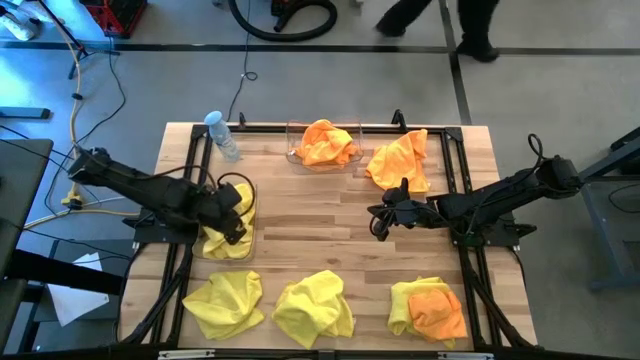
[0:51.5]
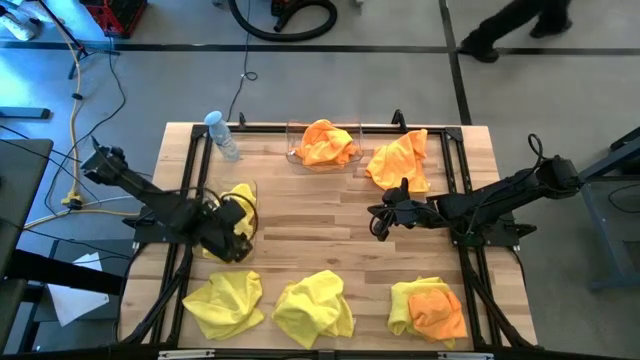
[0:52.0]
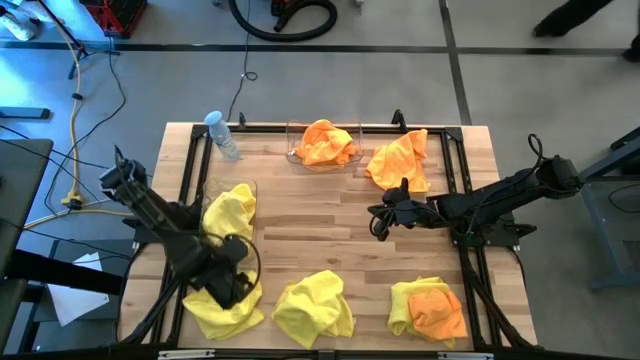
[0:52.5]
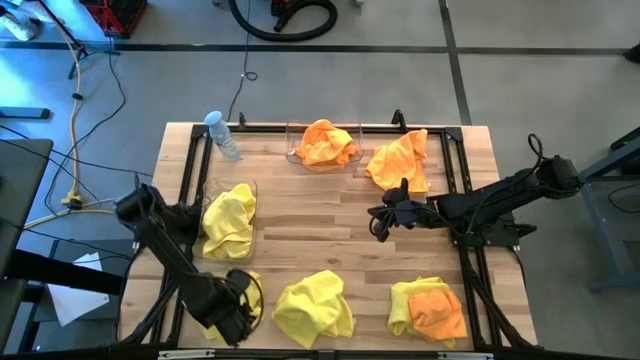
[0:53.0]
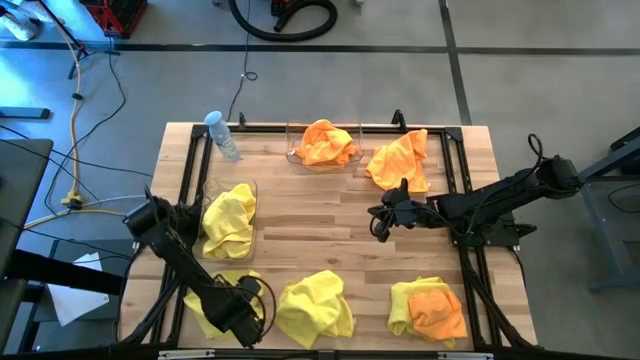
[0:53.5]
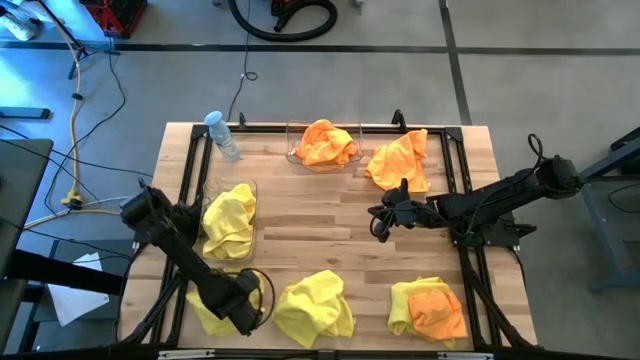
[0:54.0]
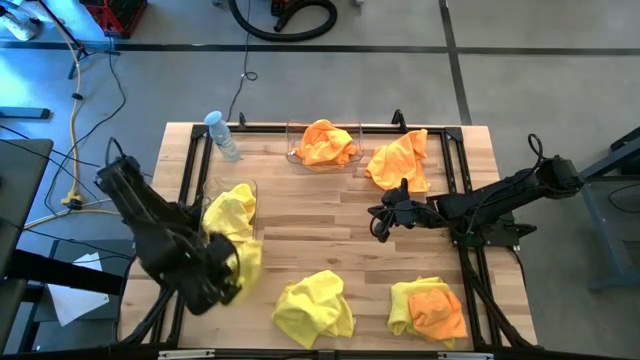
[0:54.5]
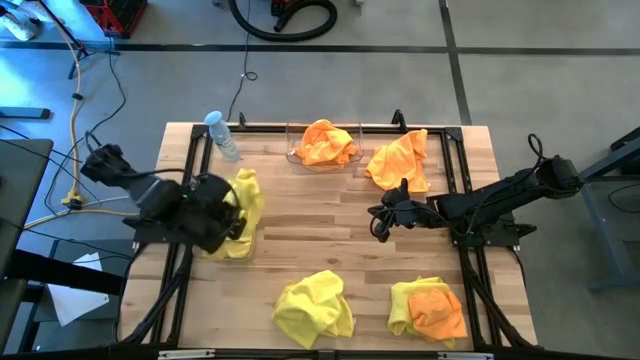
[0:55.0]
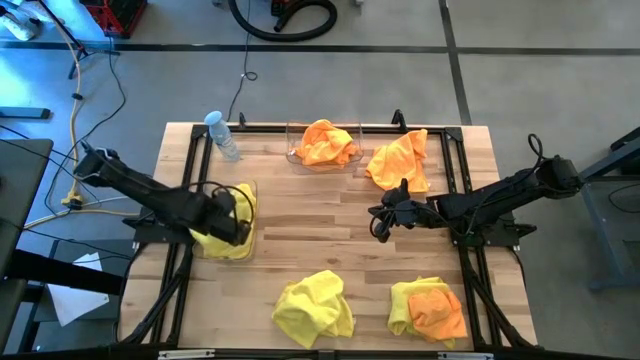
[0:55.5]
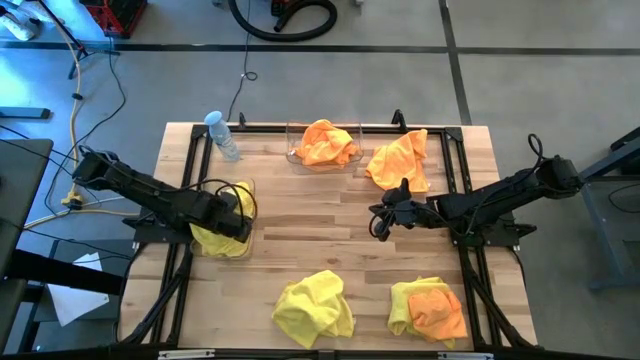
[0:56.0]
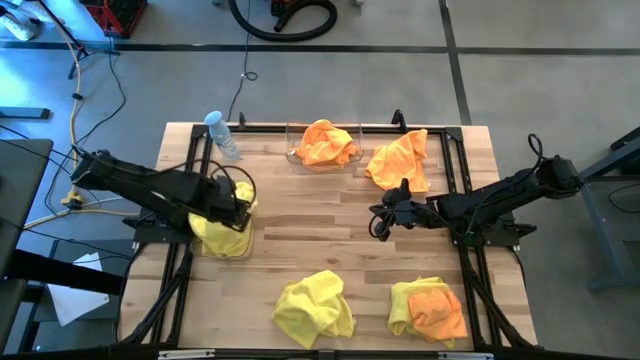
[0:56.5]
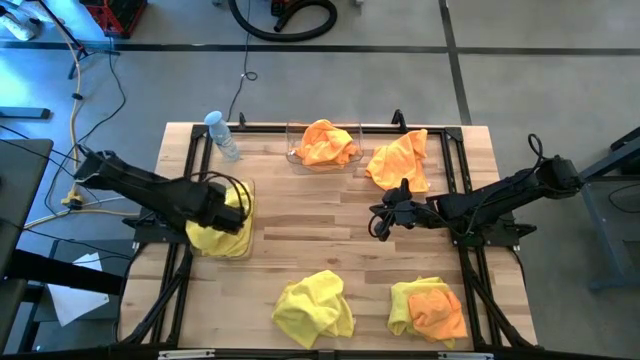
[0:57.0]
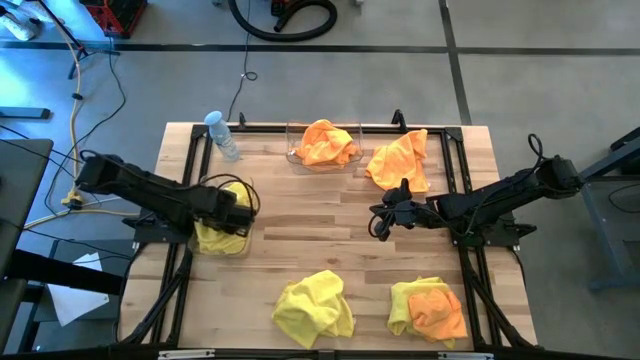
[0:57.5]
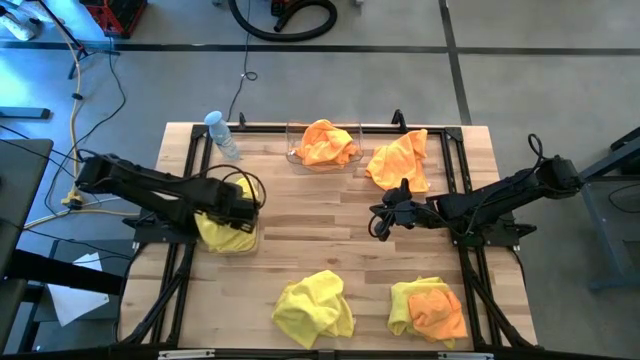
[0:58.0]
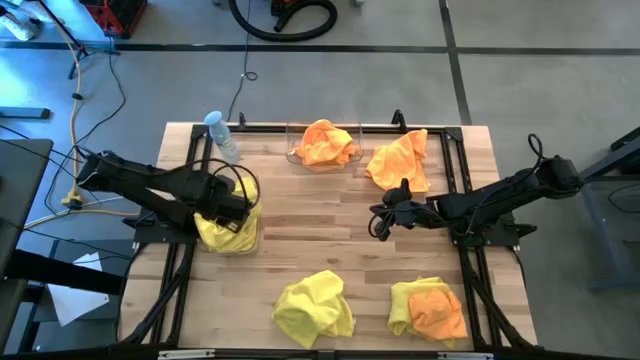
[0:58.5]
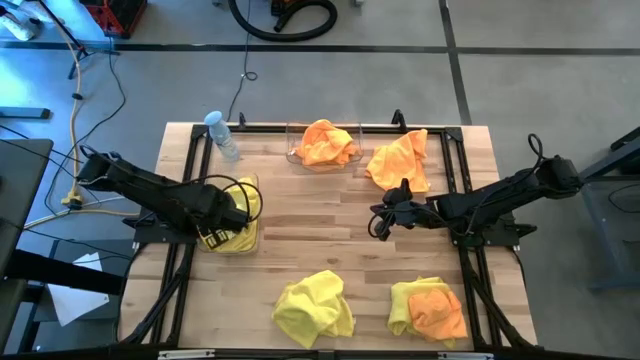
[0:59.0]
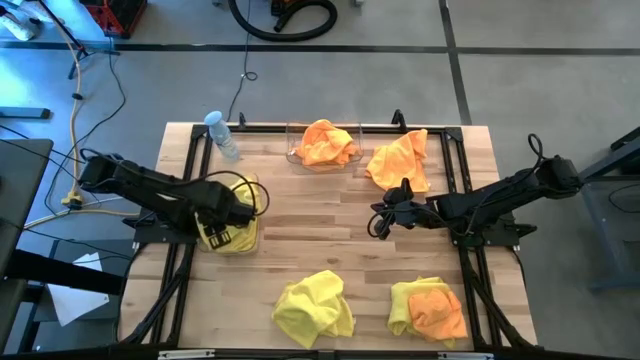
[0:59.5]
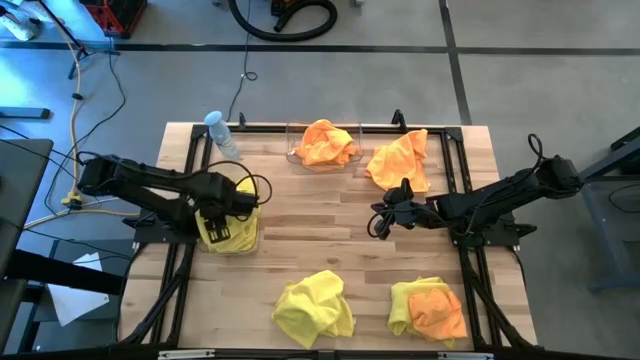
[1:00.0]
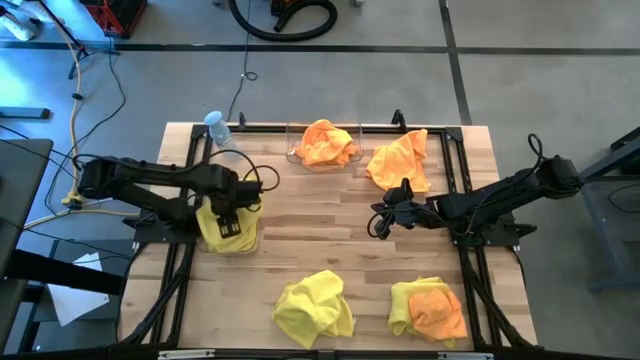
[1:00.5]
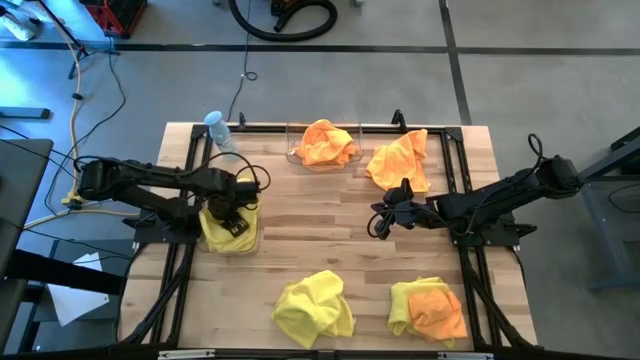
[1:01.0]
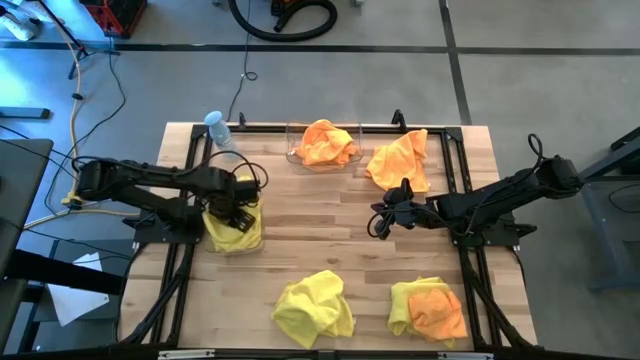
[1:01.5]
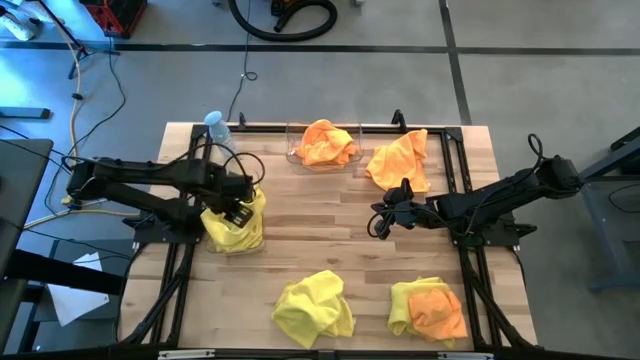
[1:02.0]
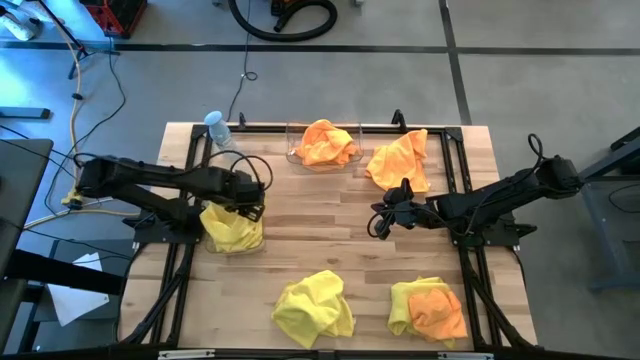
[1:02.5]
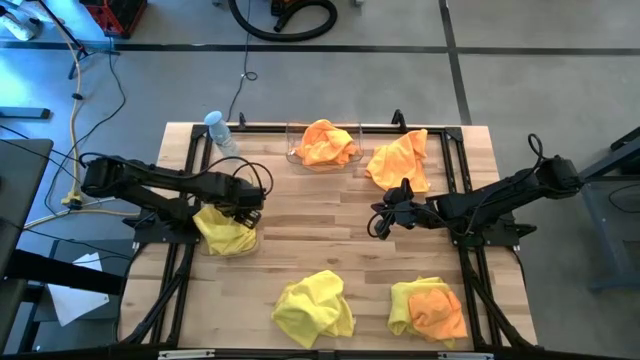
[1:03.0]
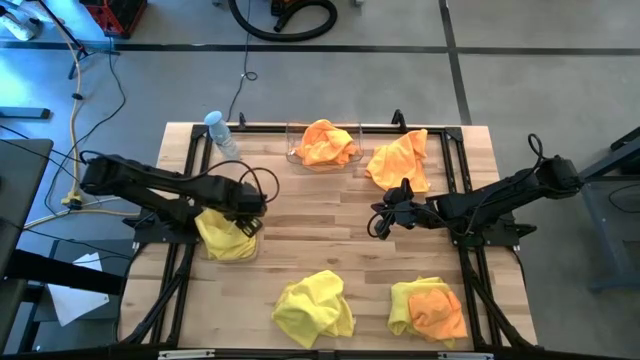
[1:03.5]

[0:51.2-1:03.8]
Task: Sort microfiber towel by color & place in baskets
Put the yellow microfiber towel into the bottom transparent bin

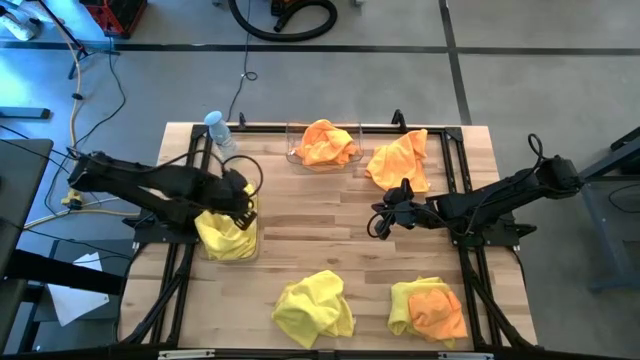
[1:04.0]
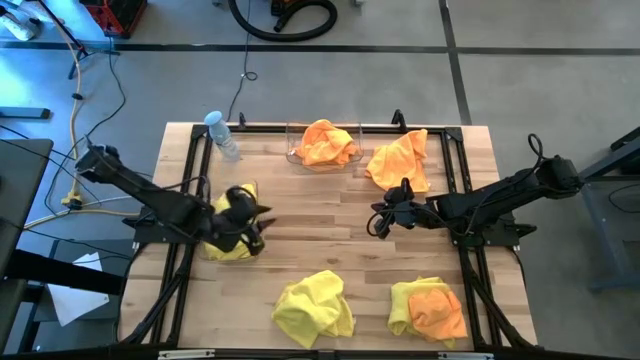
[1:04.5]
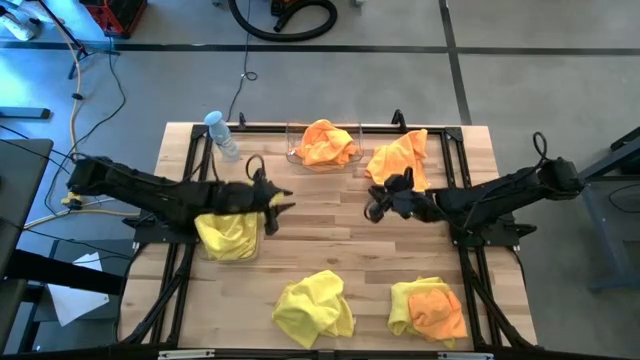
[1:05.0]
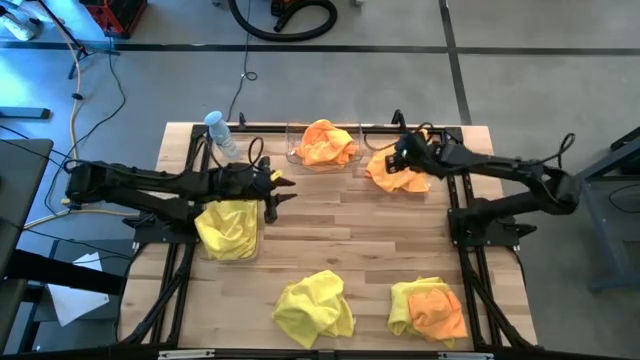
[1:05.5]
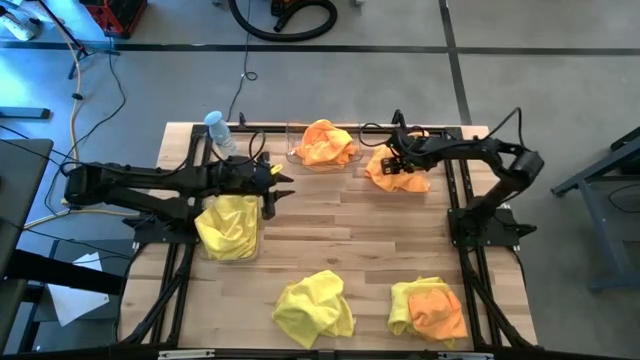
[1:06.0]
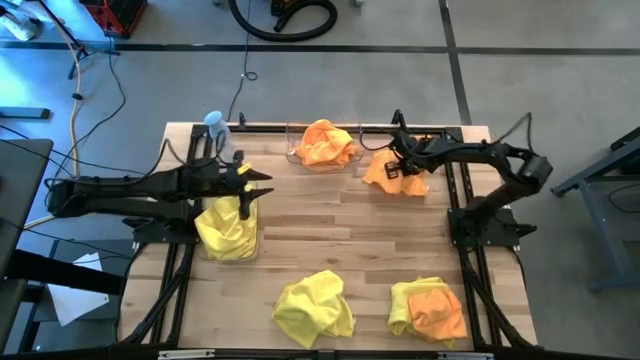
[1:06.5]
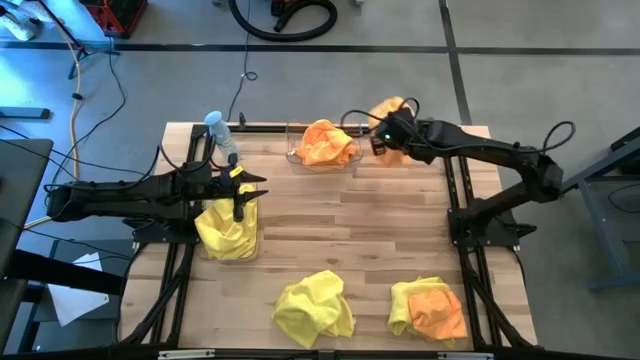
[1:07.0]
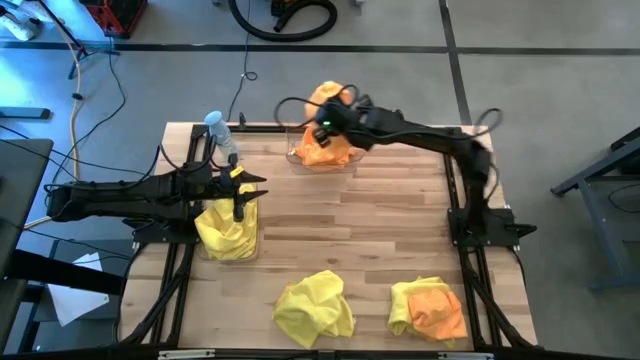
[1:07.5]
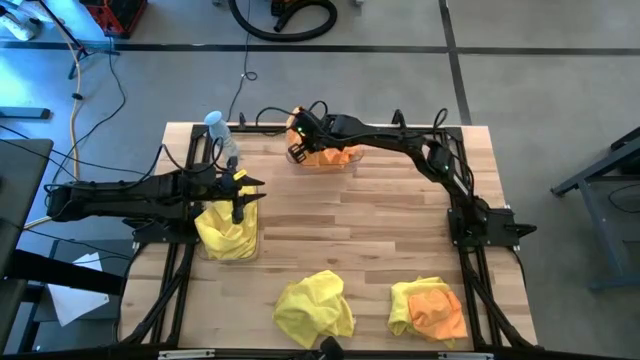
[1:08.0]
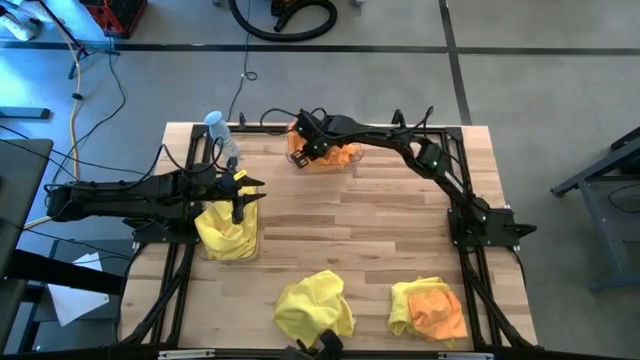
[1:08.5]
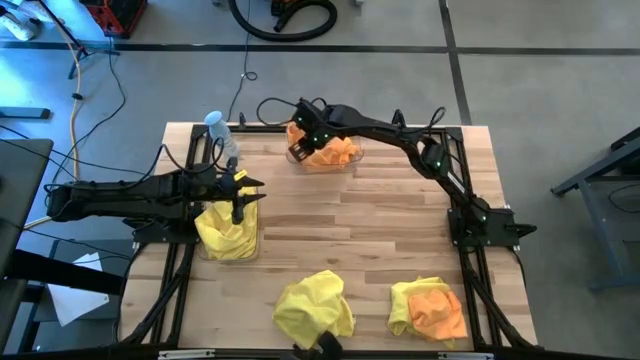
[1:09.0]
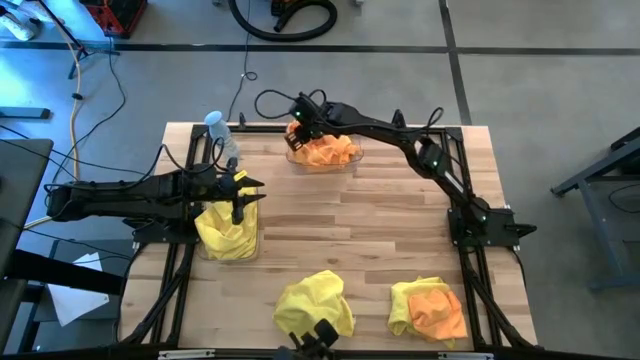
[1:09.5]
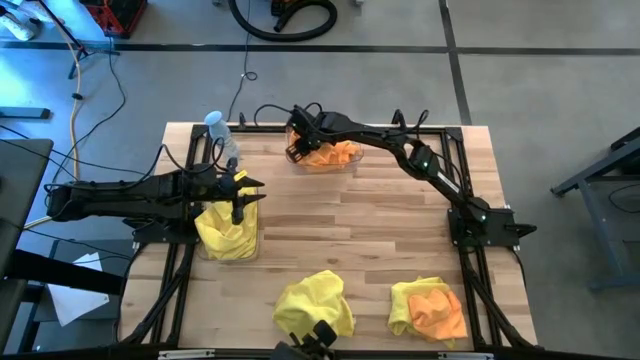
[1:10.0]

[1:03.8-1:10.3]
Put the orange microfiber towel into the top transparent bin

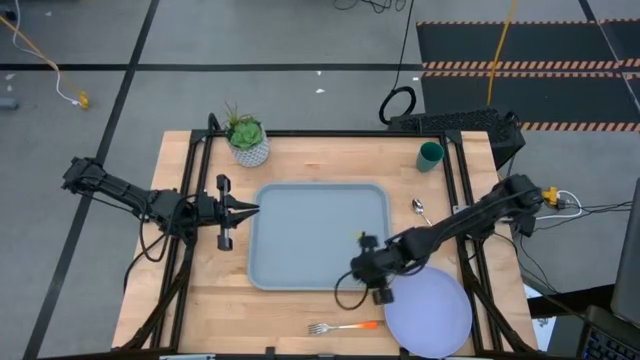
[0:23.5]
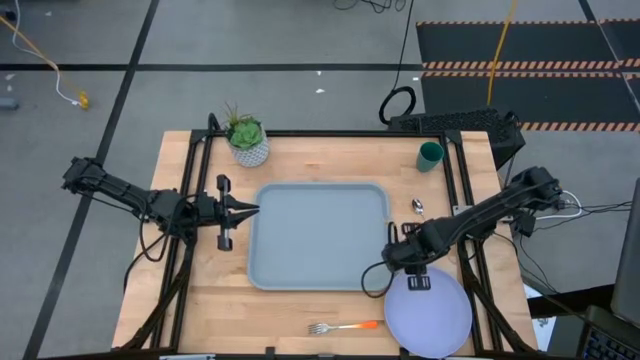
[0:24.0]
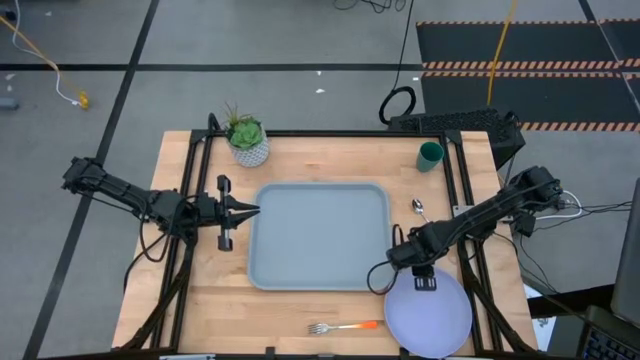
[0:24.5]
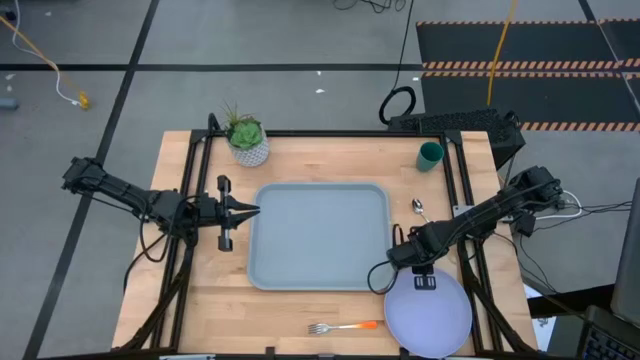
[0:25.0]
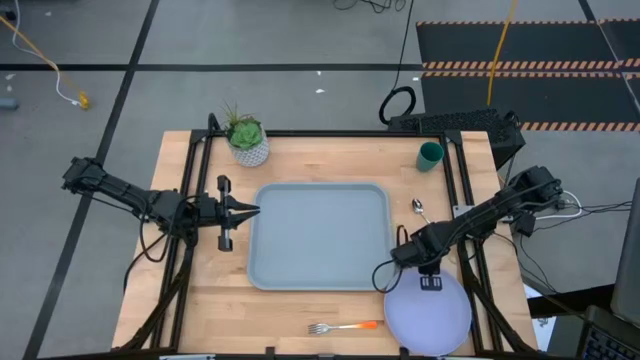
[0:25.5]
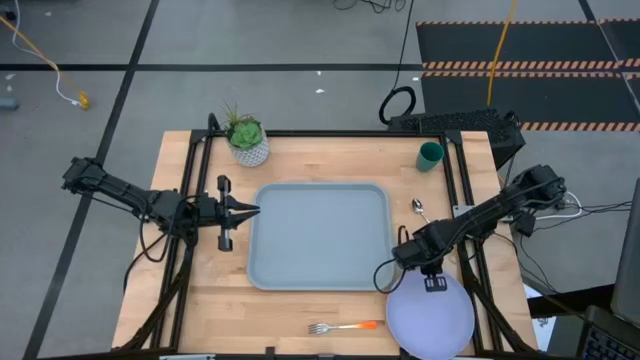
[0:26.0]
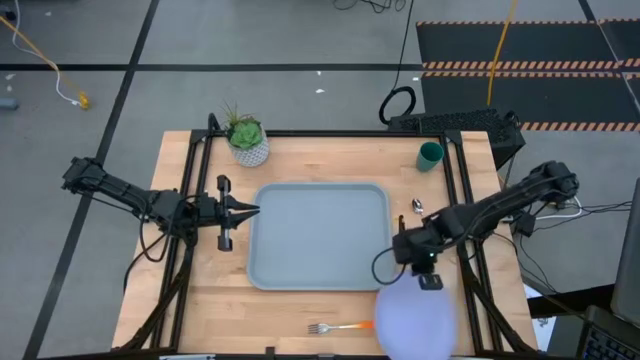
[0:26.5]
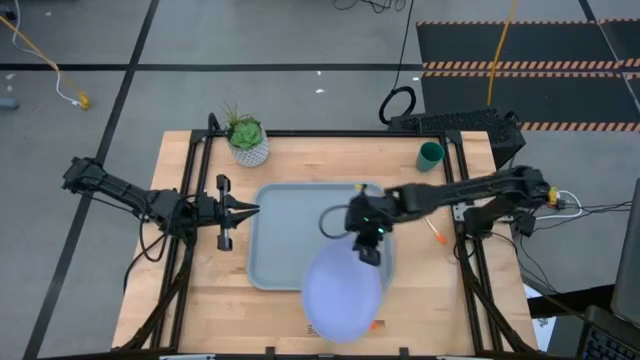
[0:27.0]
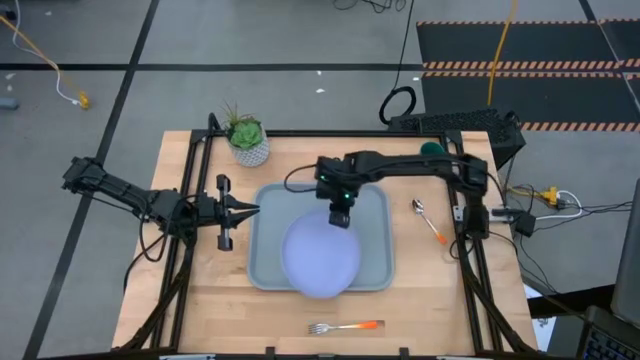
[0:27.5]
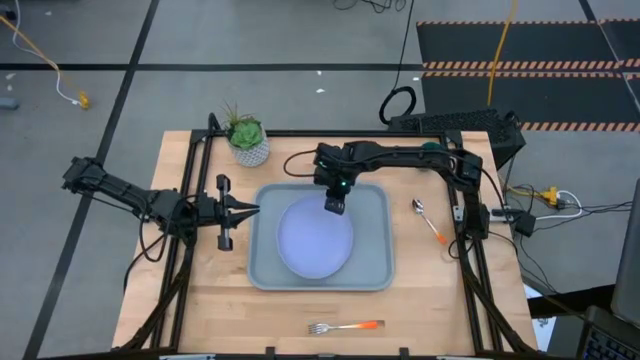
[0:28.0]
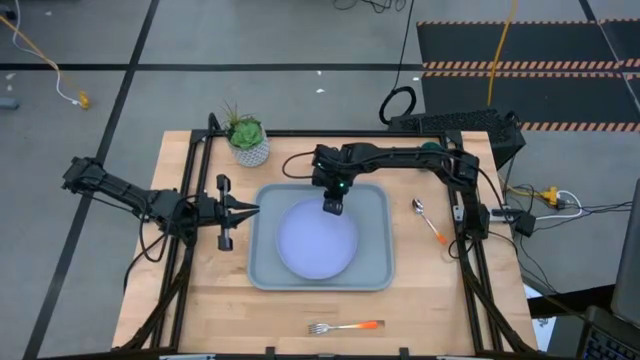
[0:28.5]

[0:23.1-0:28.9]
Task: Pick and place plate/cup/fork/spoon on tray
Put the blue plate on the blue tray
